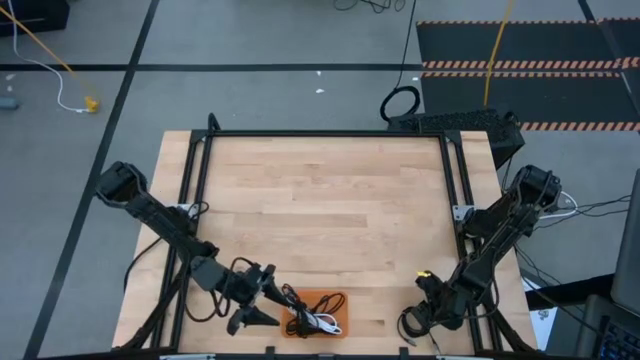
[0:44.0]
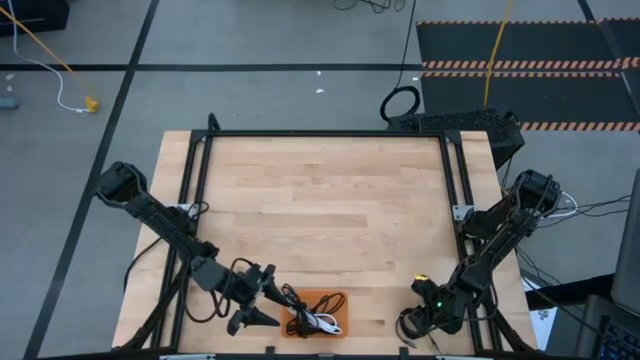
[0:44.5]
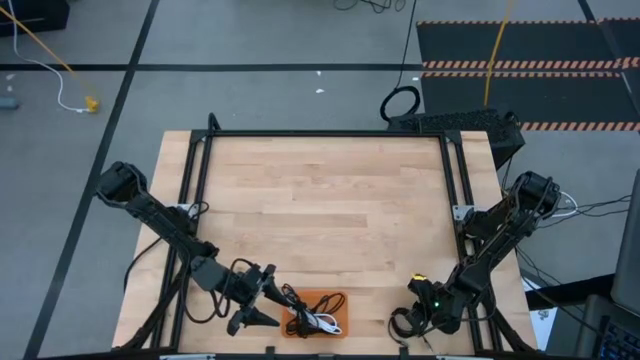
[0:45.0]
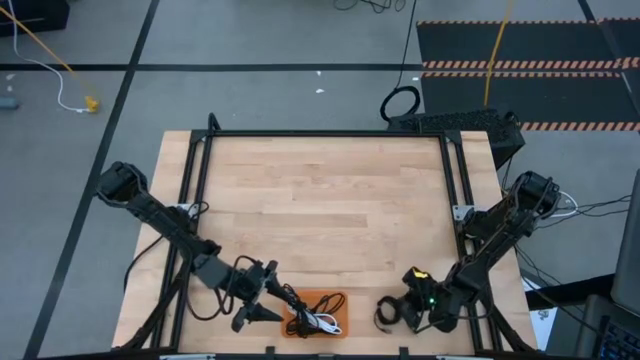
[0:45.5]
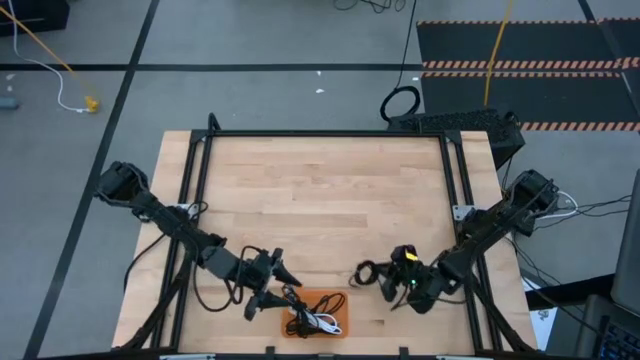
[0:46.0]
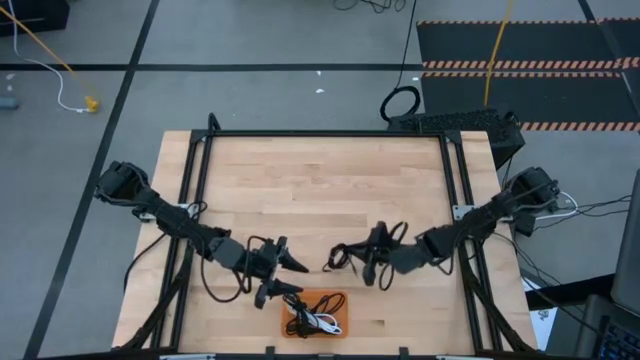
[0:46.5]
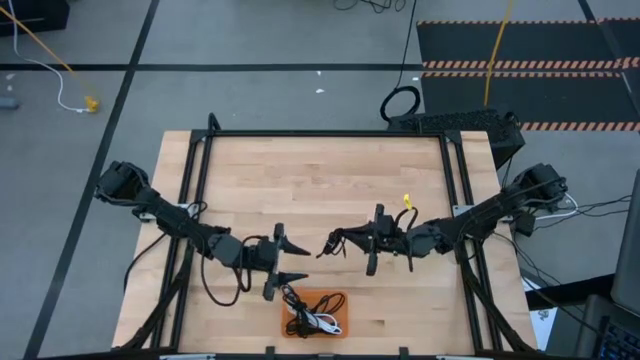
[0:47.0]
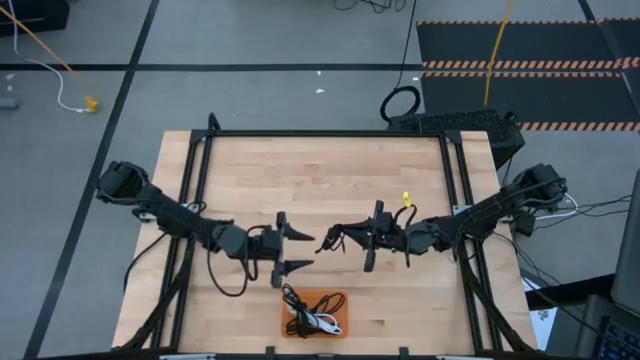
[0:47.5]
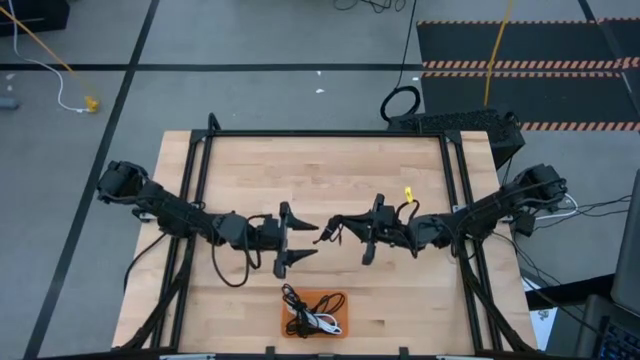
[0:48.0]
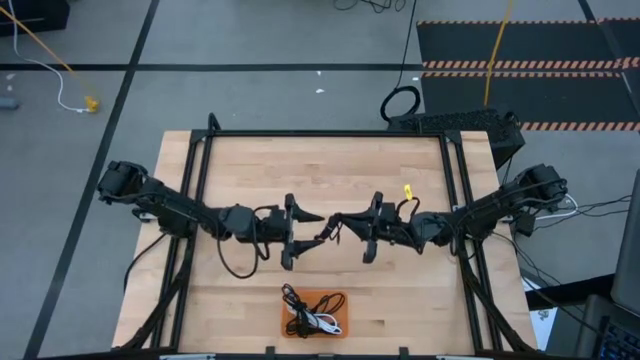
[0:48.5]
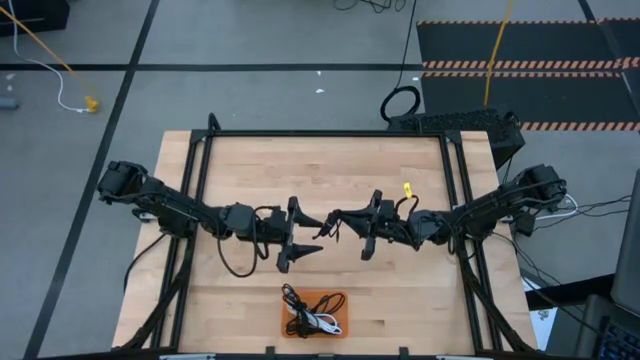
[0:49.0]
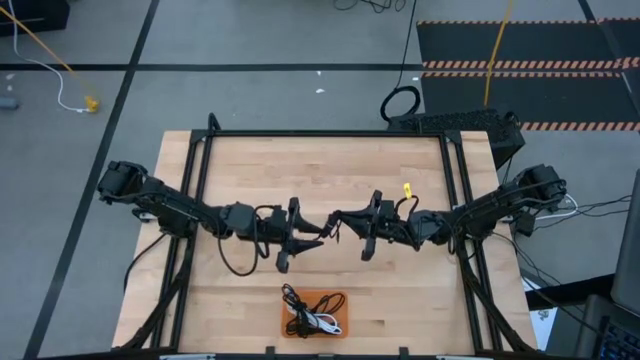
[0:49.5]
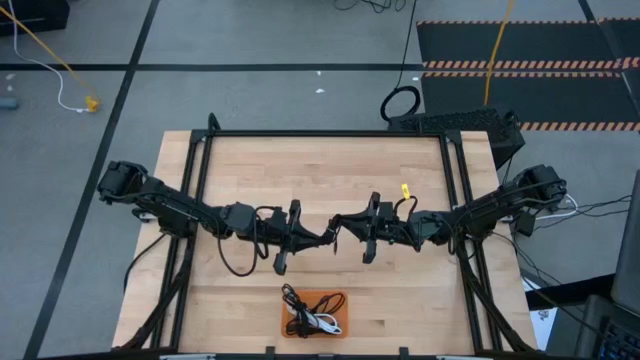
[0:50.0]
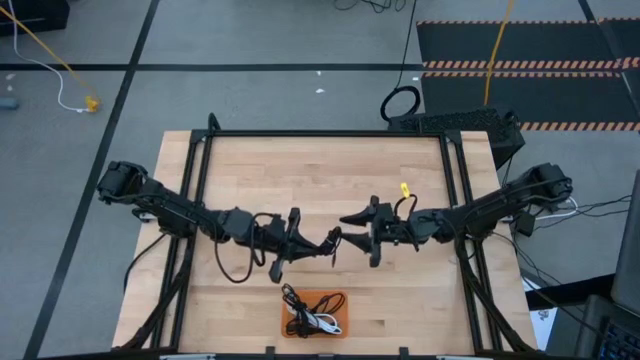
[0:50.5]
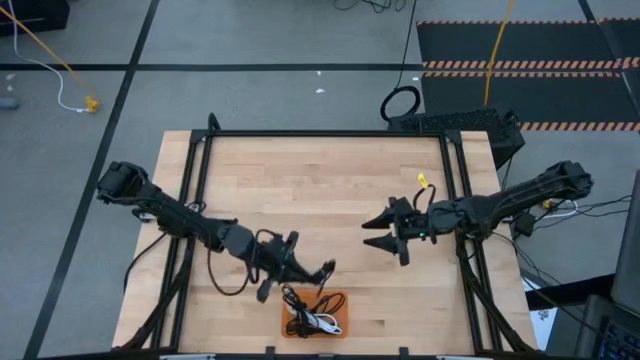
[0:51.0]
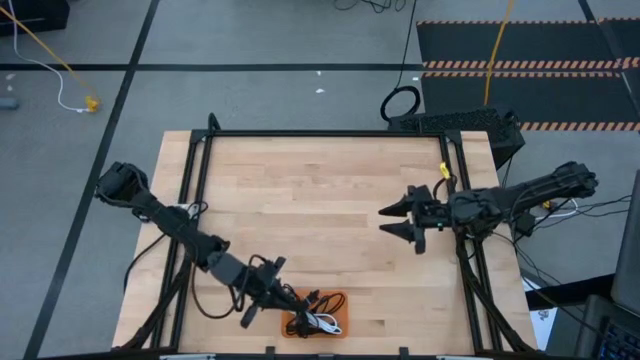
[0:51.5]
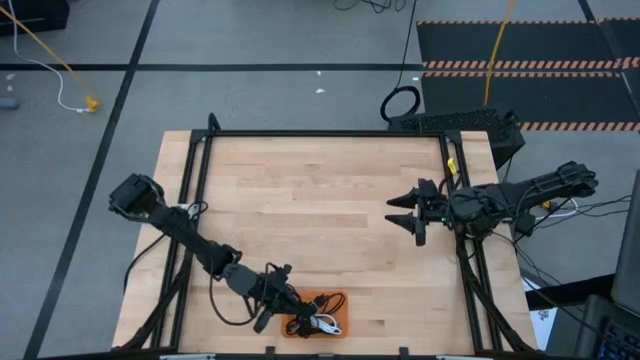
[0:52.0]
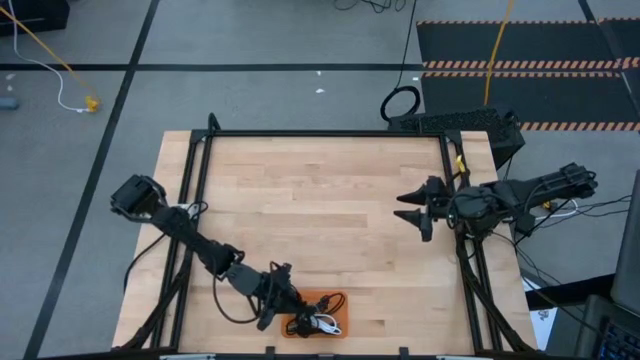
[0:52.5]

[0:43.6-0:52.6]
Task: Pick and place USB-C Cables
Put the black charger cable into the orange bin

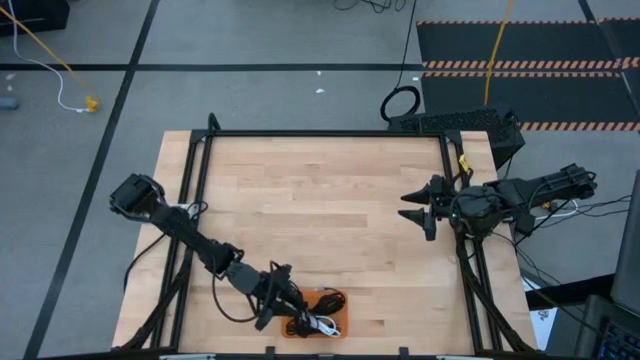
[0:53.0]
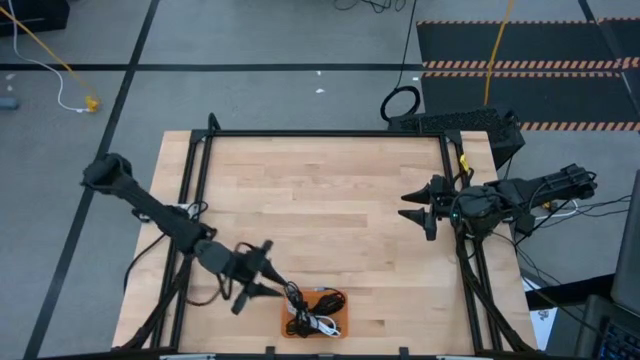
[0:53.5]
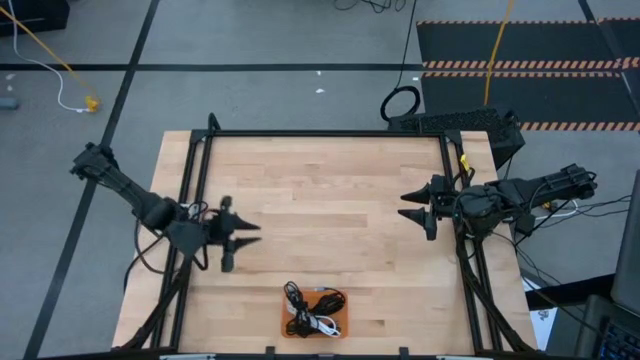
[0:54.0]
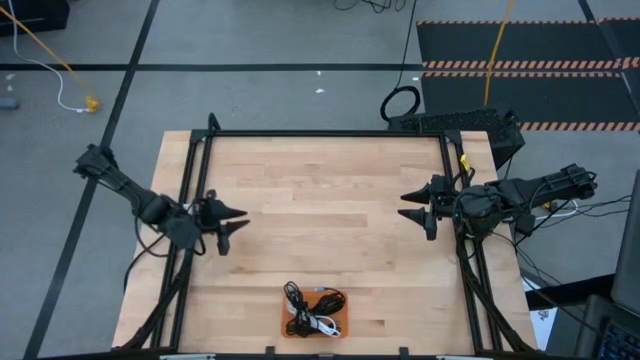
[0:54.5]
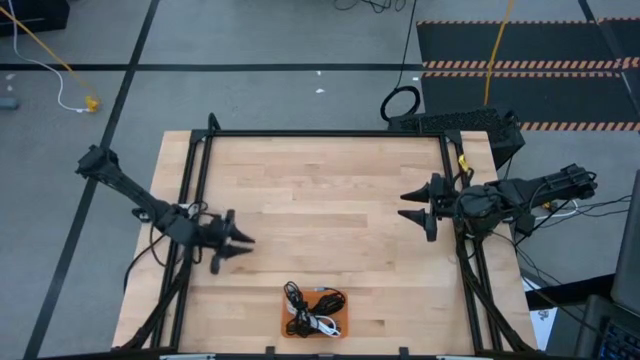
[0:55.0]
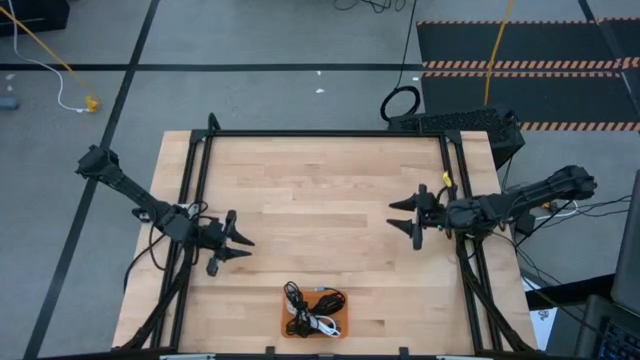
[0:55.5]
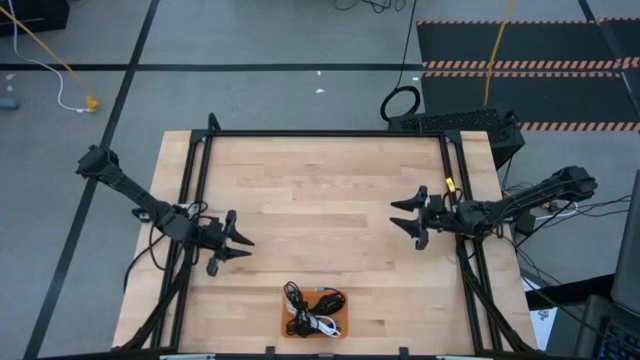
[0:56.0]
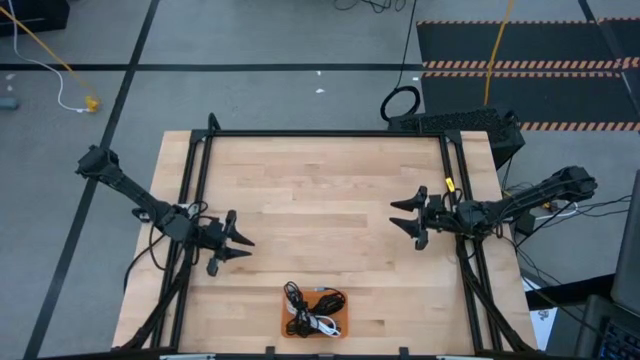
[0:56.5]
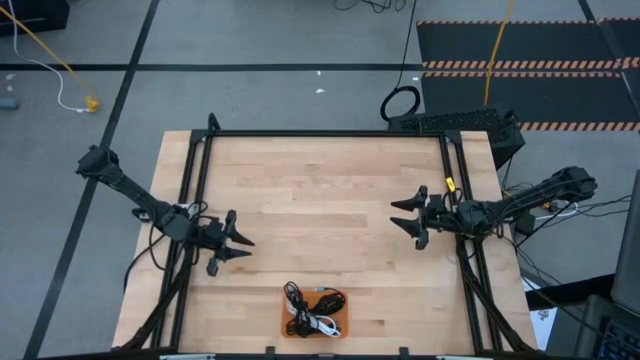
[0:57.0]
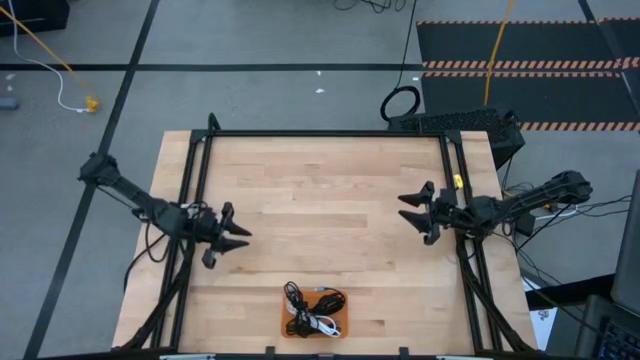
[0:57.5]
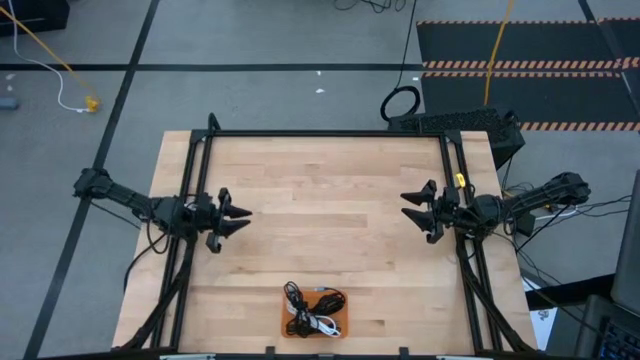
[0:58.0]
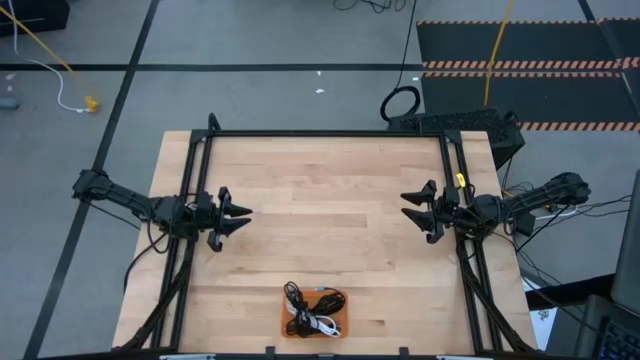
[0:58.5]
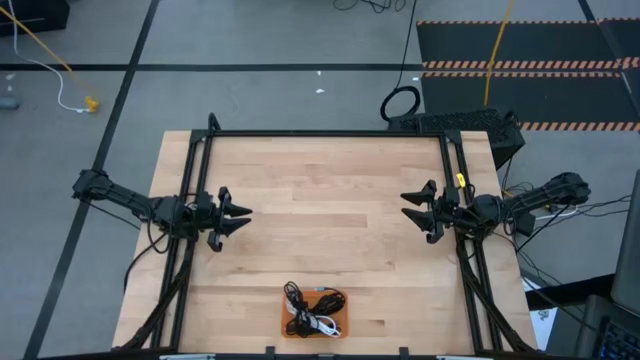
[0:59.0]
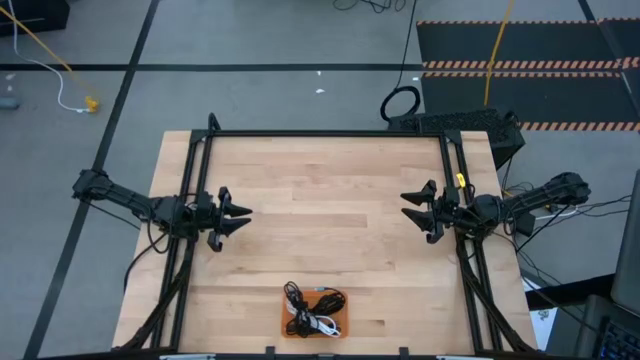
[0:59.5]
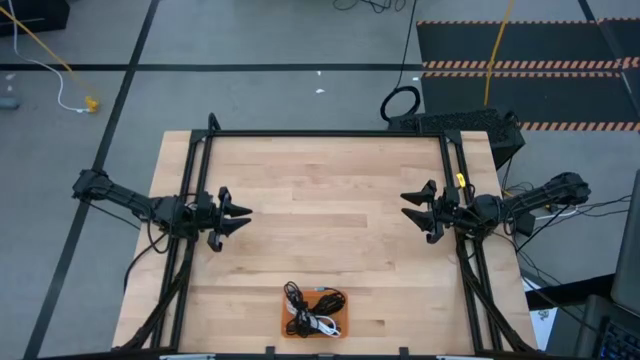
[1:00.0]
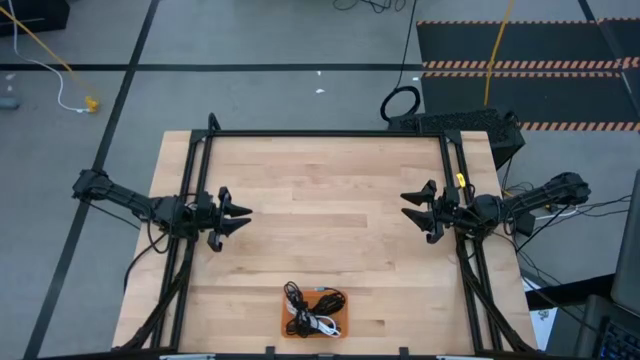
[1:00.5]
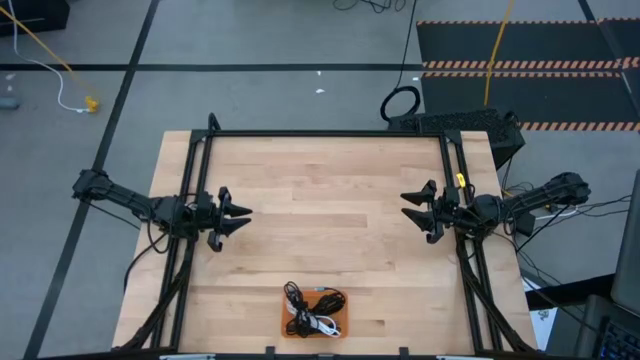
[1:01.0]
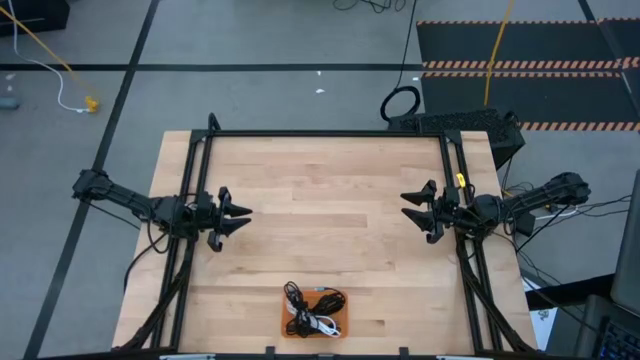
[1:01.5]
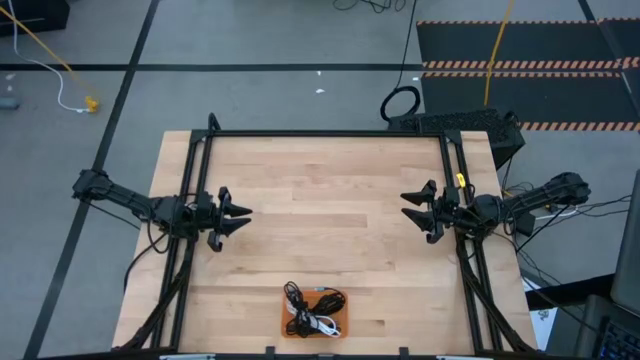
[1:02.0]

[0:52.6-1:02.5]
Return to Home Position

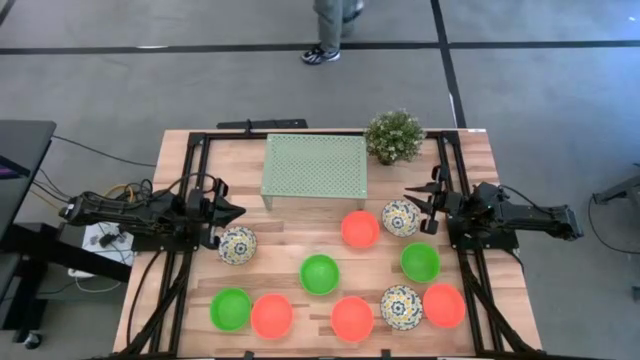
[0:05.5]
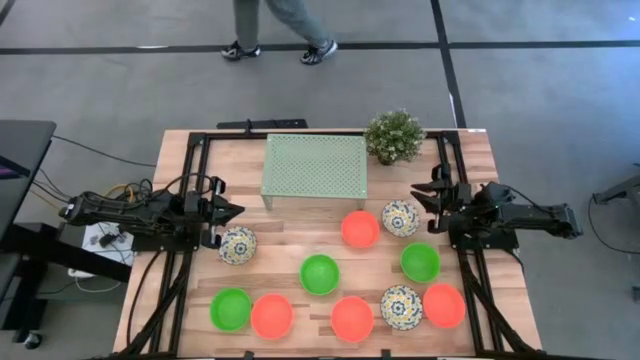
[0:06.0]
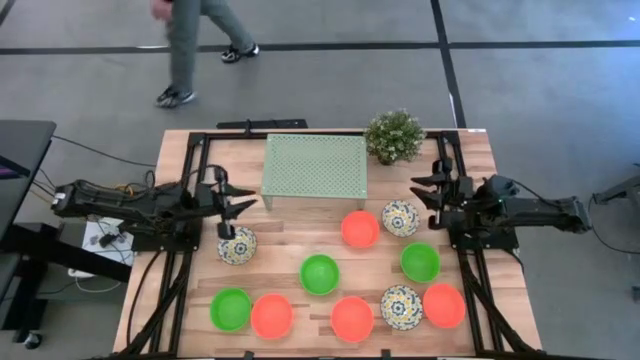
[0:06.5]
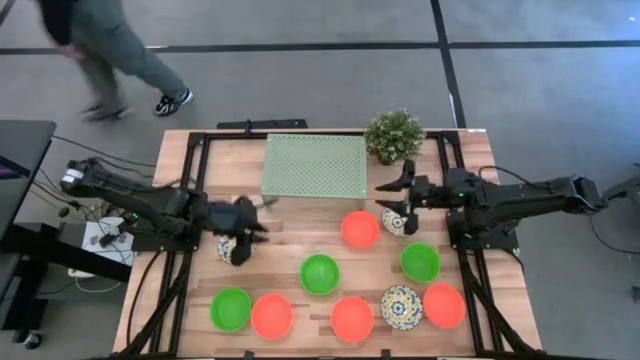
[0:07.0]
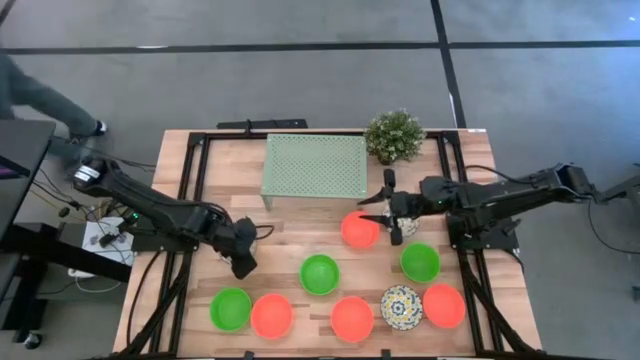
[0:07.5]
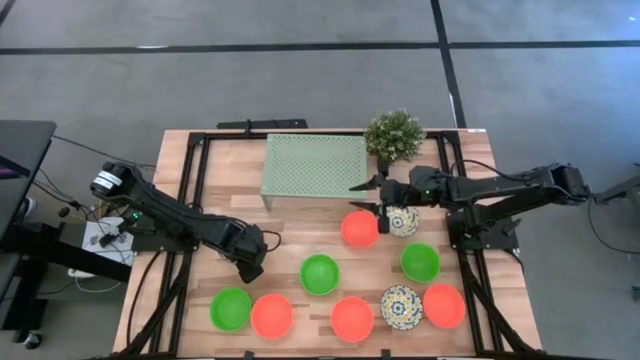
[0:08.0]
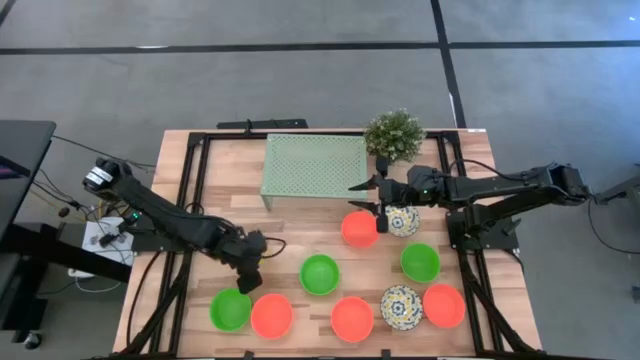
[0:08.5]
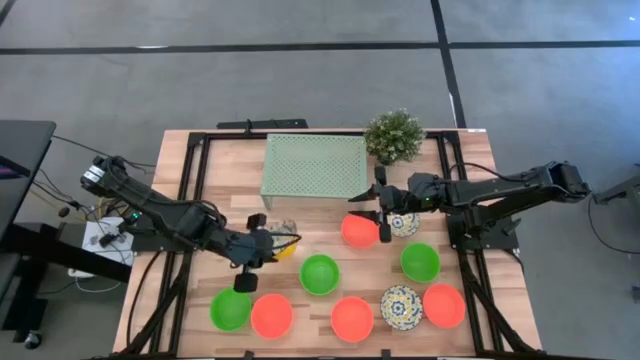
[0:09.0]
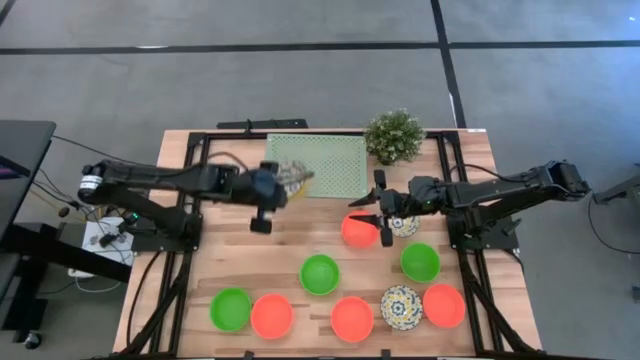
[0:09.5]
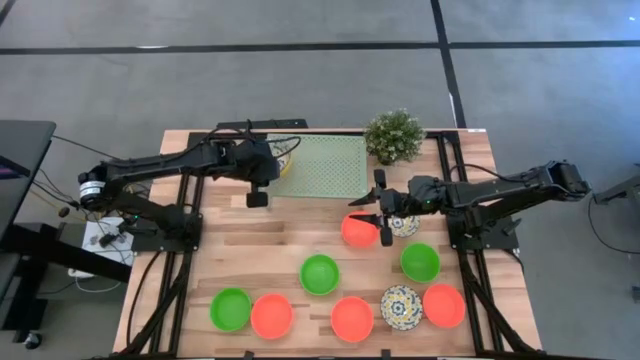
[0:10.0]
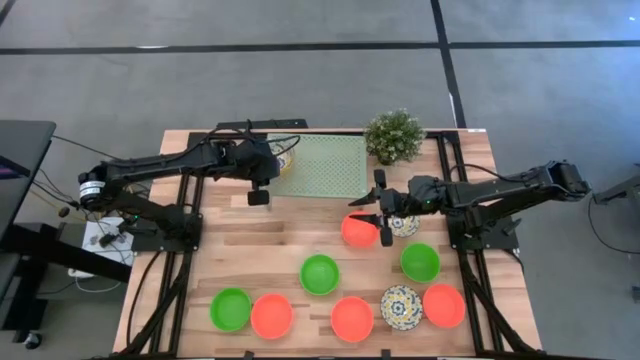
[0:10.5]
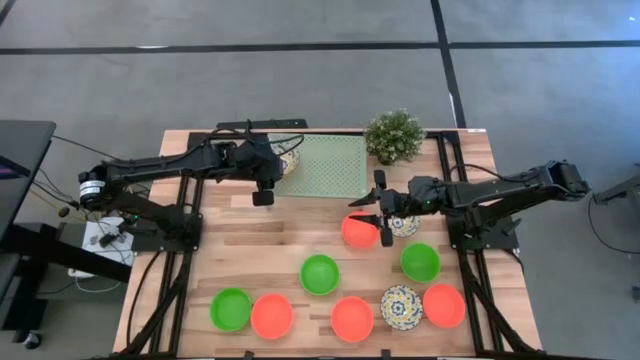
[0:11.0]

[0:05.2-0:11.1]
Task: Pick & Place Mini bowls
Put the white patterned bowl on the shelf
